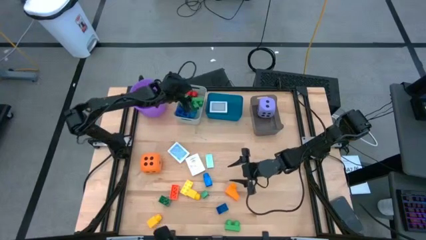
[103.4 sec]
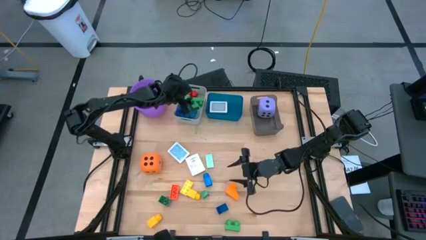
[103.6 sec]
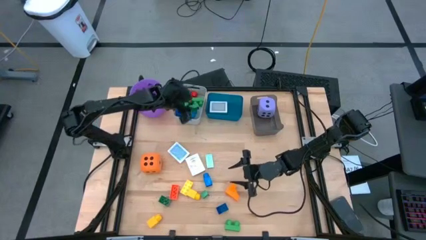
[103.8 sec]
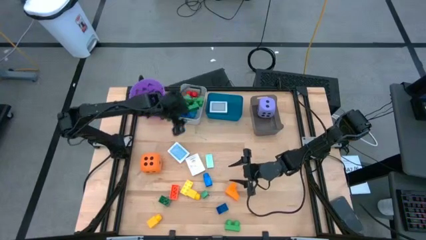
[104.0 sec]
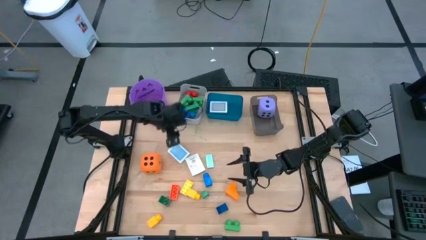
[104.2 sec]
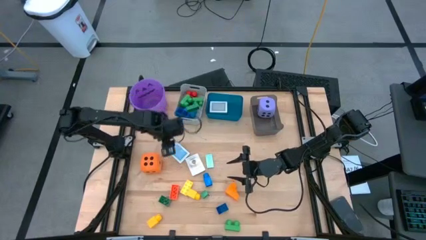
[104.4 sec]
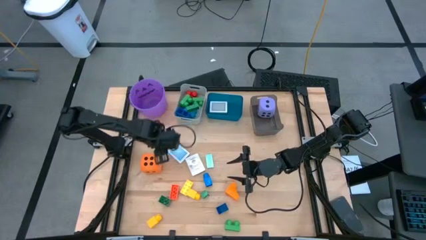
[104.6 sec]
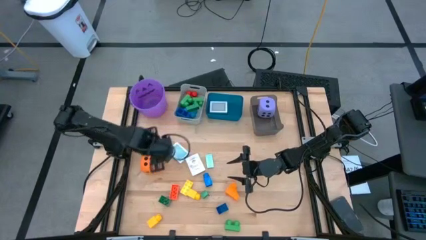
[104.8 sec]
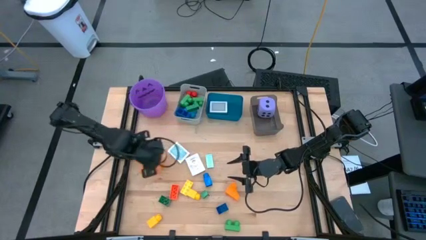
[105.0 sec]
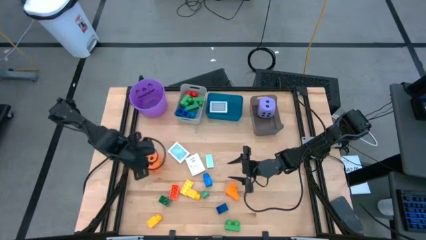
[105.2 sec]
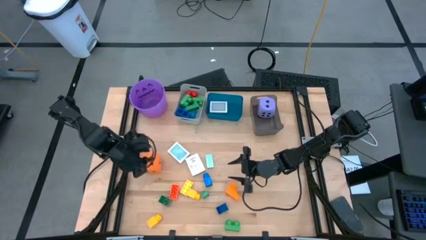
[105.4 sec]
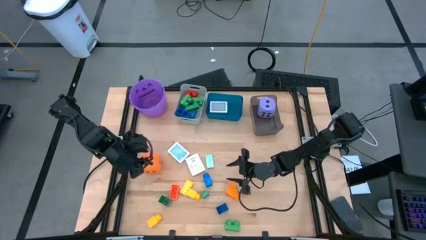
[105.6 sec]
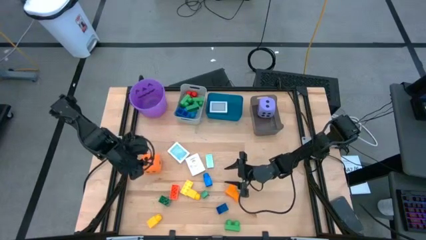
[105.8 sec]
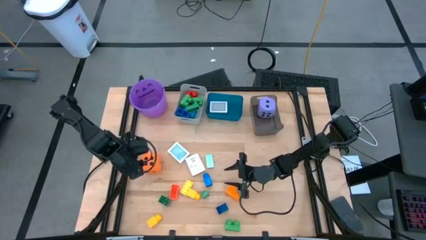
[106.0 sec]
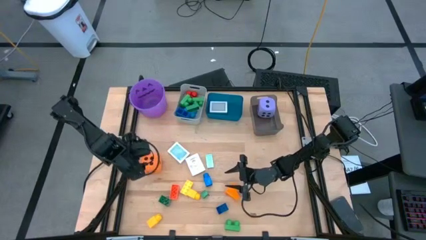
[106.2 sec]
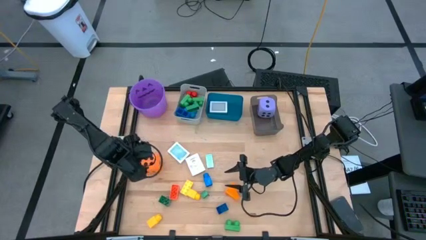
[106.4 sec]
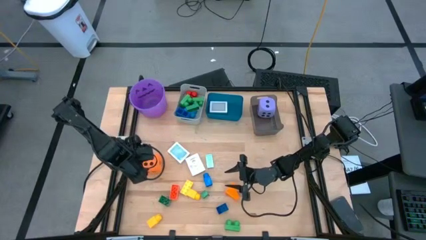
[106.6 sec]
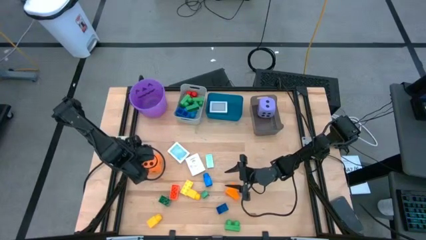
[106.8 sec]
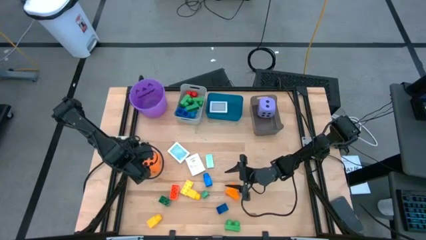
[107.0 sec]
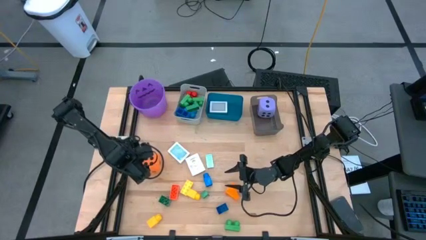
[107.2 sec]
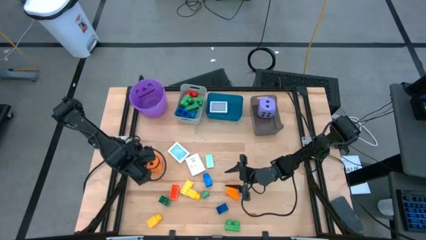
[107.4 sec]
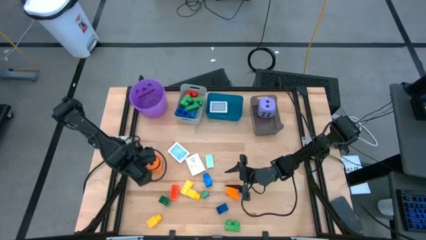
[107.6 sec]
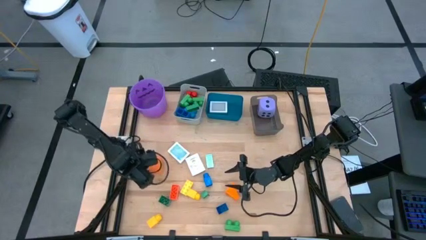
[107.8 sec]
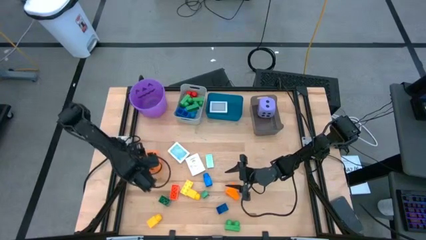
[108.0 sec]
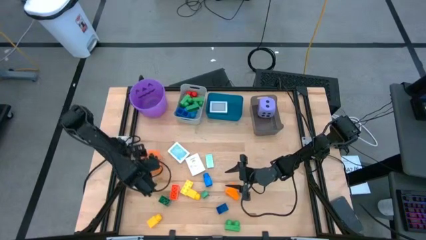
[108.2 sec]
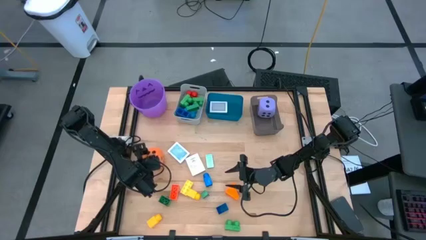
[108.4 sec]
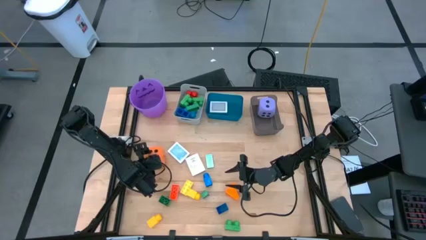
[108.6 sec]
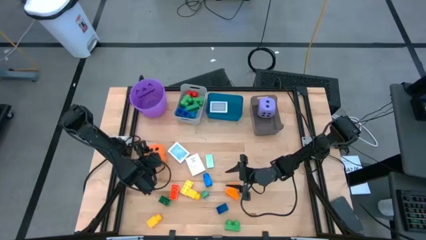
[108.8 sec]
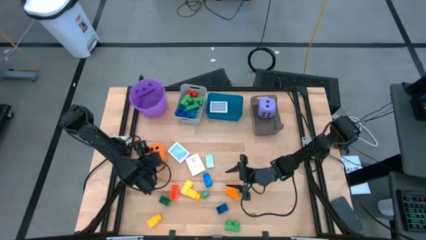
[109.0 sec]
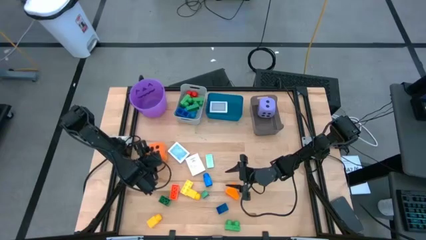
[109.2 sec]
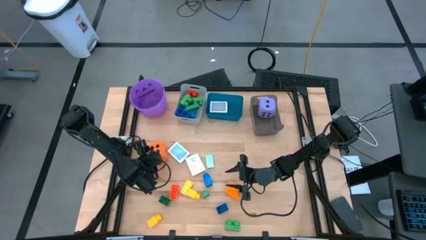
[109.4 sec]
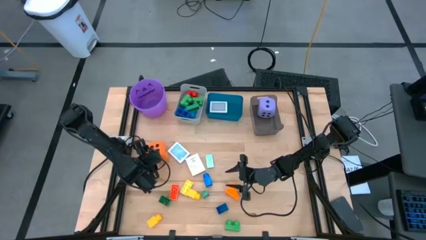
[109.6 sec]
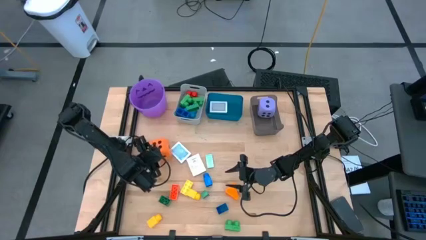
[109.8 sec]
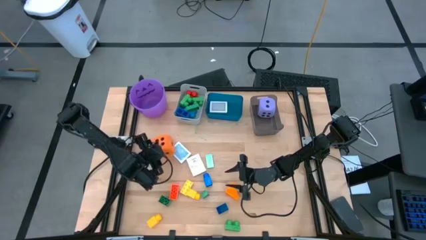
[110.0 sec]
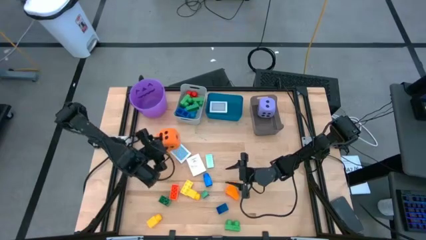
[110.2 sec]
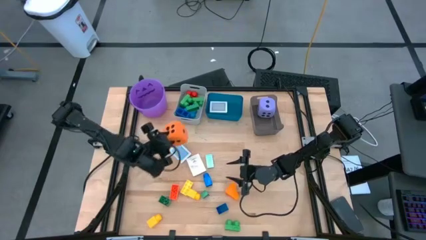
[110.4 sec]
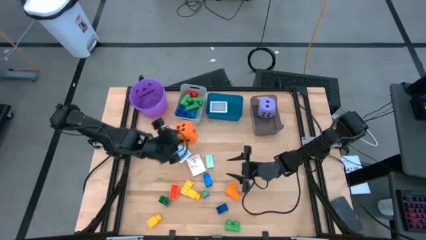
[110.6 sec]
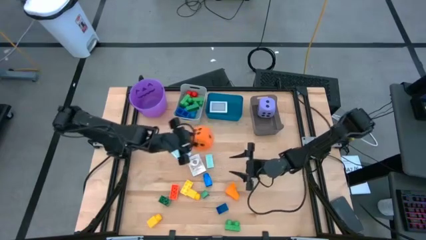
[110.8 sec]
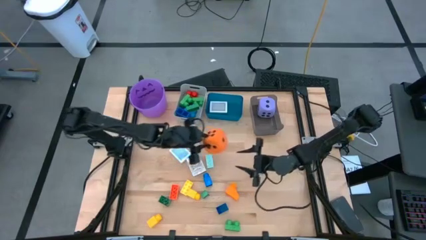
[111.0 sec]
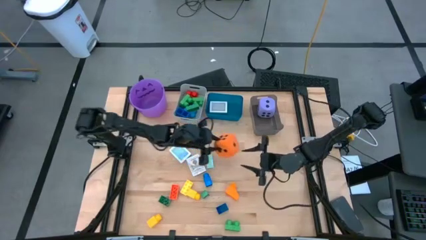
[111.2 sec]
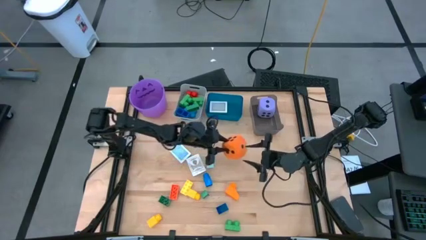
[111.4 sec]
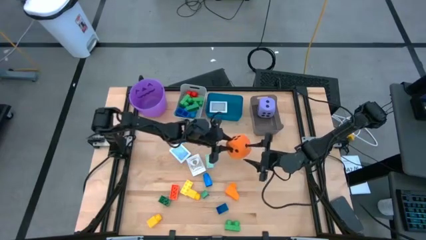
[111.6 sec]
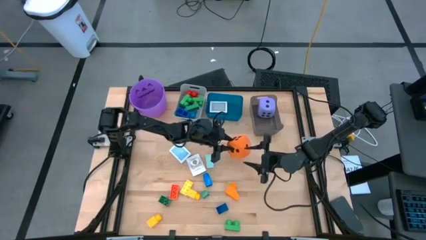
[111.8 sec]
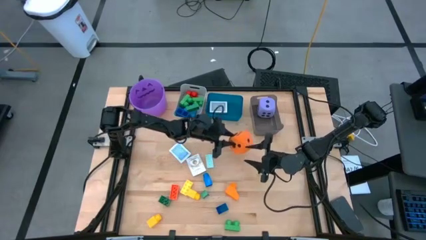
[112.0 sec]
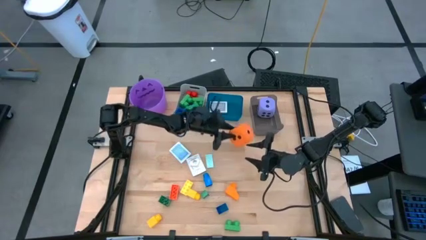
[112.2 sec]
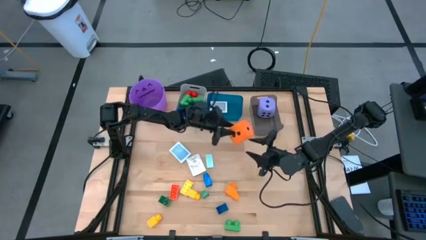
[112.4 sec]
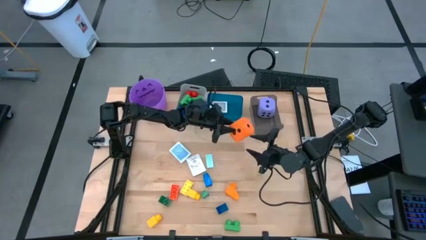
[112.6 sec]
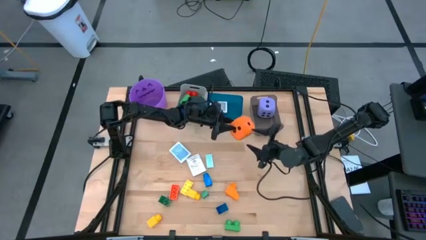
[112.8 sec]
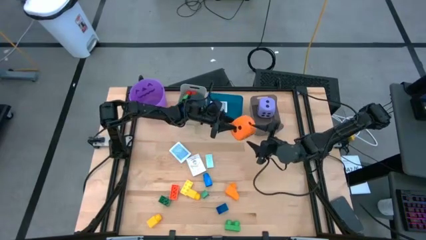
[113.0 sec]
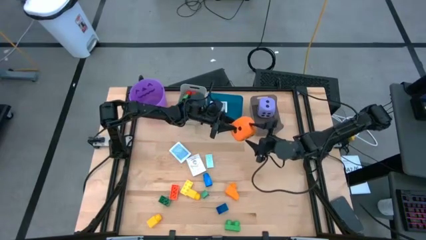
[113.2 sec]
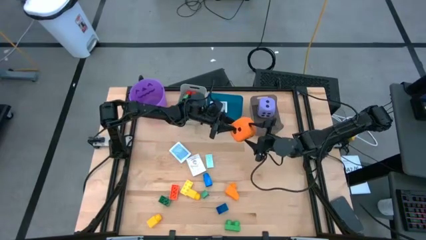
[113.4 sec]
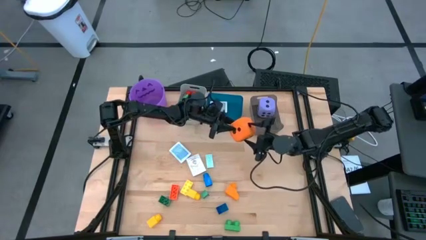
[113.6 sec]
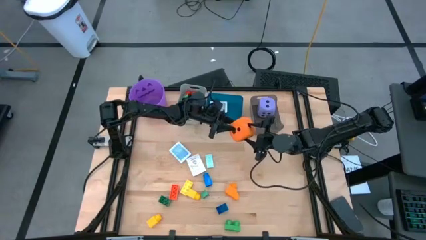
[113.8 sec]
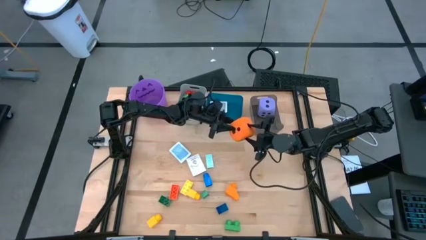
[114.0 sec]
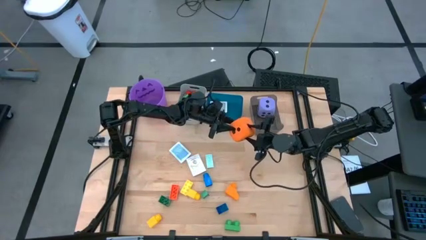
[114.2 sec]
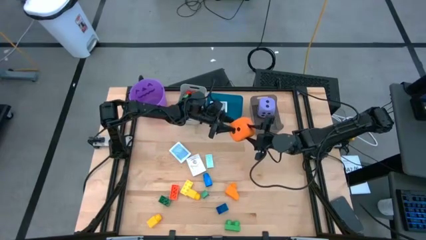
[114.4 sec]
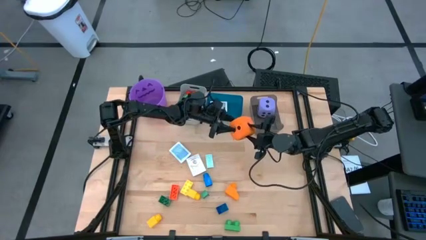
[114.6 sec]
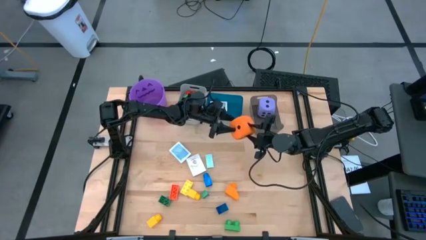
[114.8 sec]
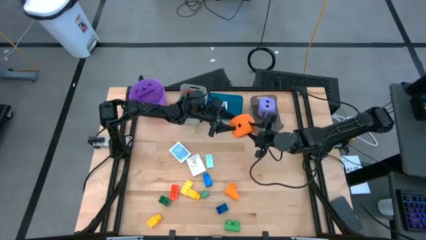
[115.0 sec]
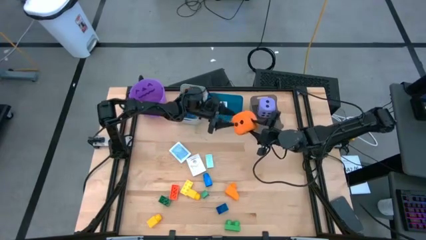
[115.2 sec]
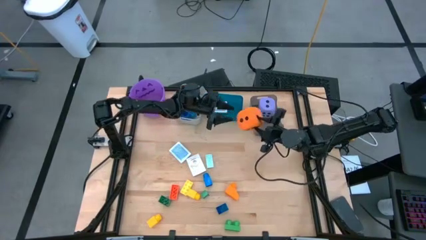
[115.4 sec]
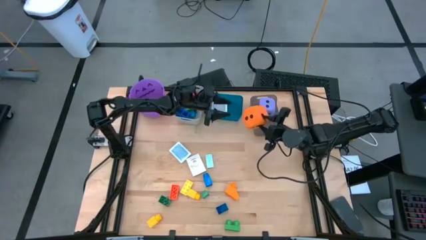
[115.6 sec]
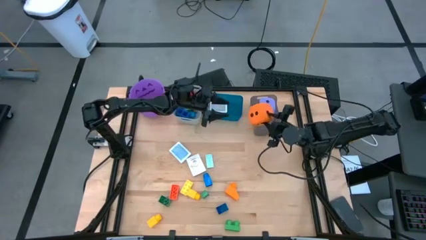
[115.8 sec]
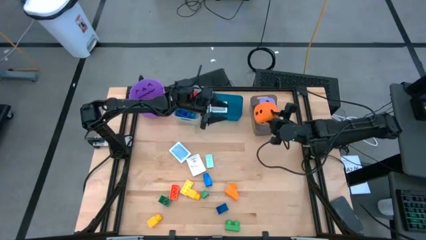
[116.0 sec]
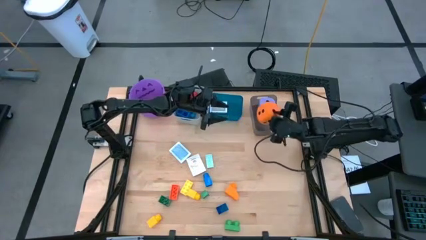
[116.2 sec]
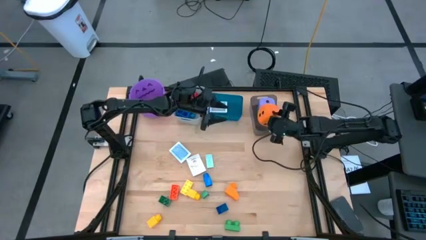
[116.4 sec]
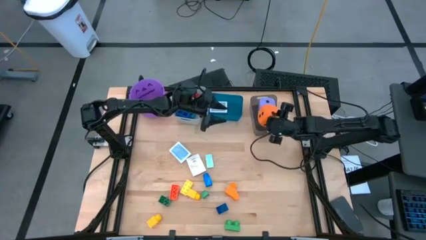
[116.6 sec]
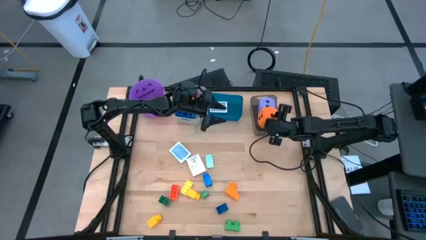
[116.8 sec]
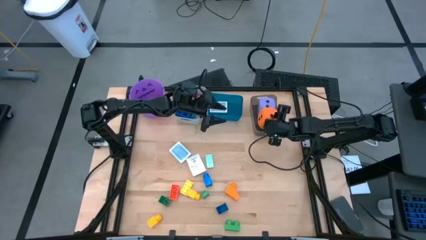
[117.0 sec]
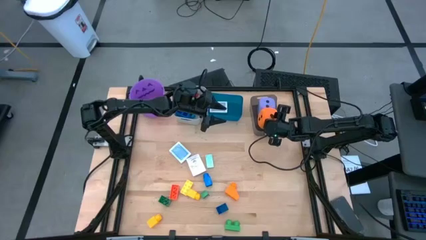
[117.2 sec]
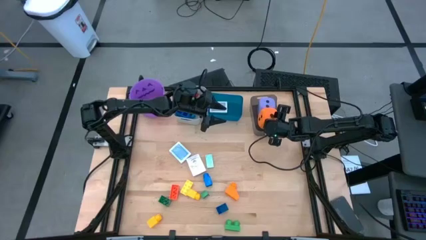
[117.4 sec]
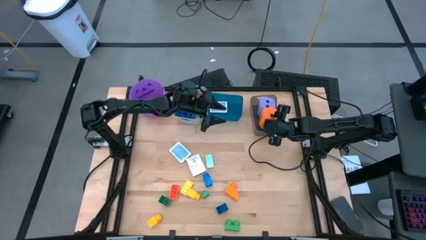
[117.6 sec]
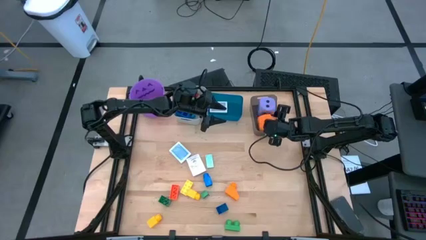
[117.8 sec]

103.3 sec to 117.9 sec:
Task: Pick & Place Toys
Put the orange die into the black bin
